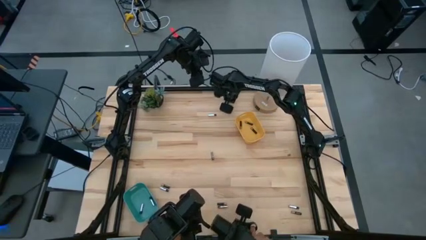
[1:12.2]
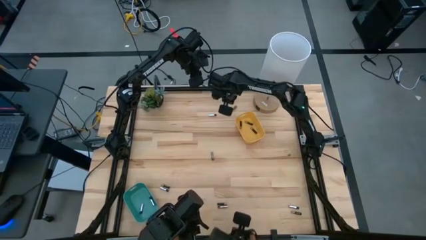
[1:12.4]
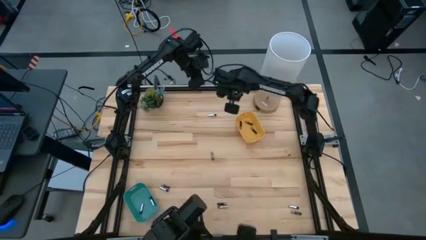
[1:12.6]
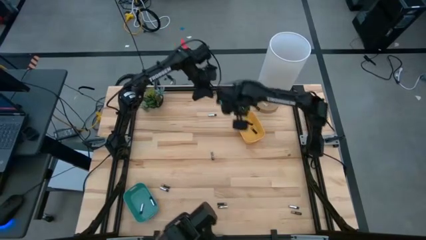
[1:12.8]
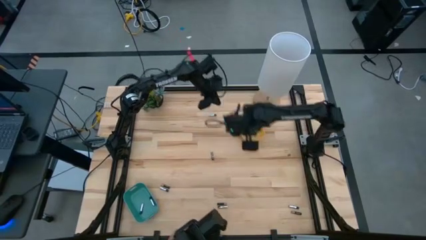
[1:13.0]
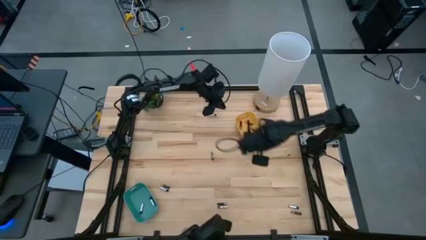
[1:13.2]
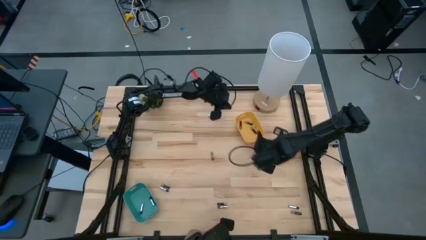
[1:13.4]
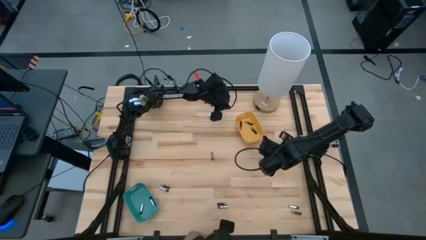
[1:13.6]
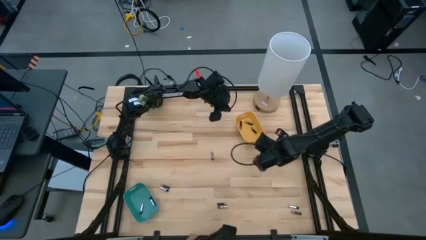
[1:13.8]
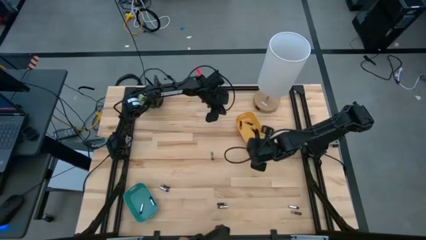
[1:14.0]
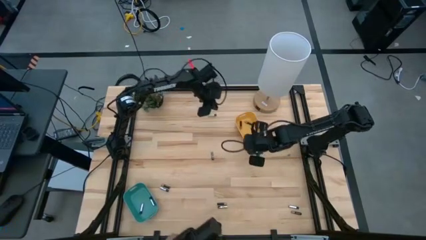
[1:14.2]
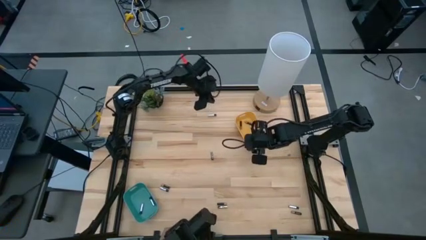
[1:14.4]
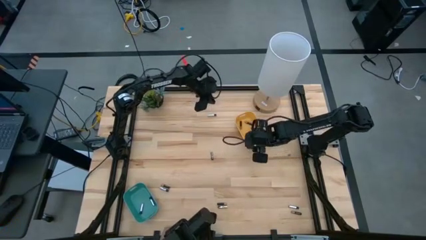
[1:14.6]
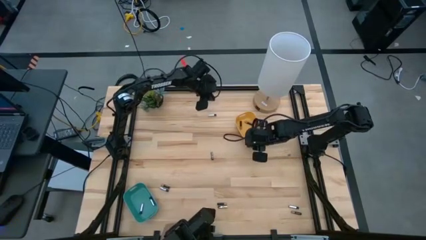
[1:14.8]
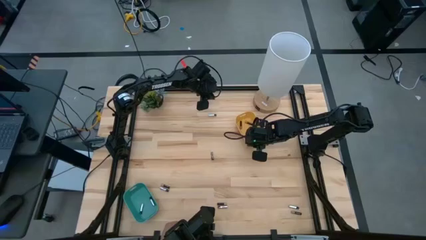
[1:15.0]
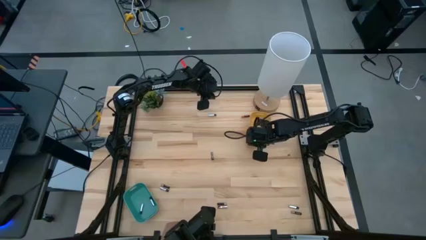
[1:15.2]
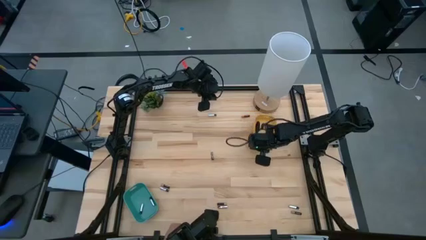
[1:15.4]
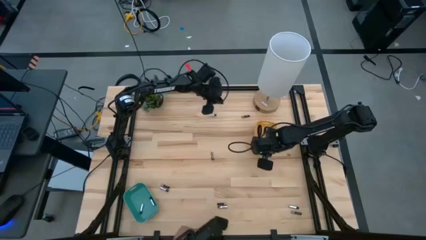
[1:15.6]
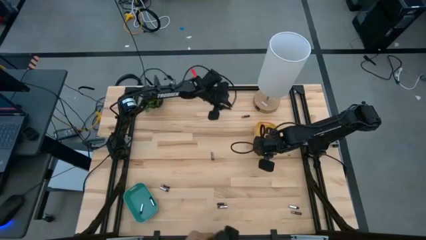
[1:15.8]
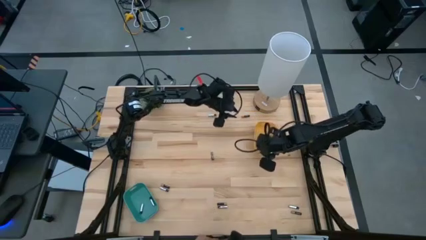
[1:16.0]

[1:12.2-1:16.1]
Task: Sort batteries
Adjust the yellow bin

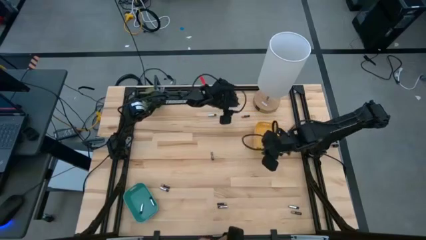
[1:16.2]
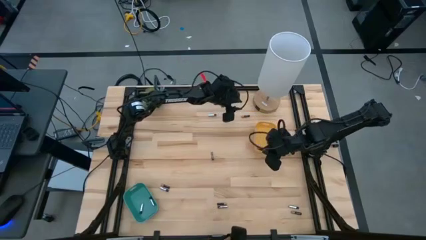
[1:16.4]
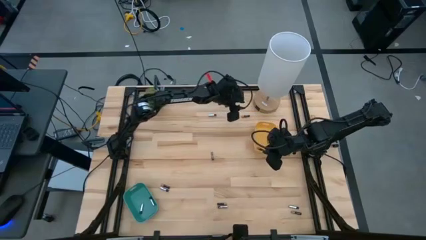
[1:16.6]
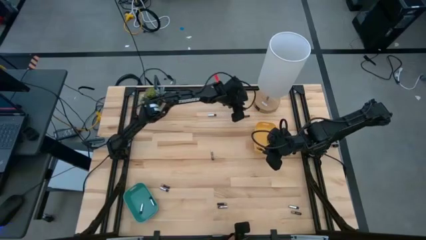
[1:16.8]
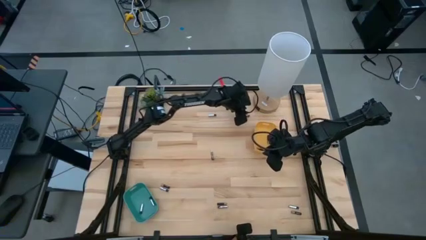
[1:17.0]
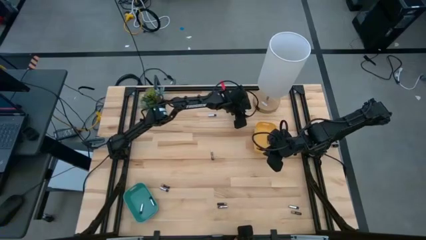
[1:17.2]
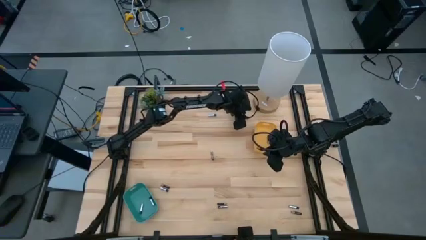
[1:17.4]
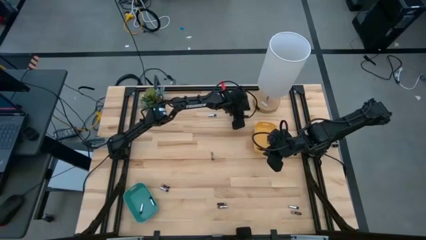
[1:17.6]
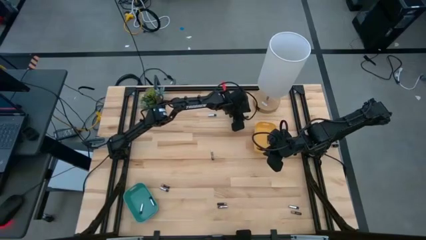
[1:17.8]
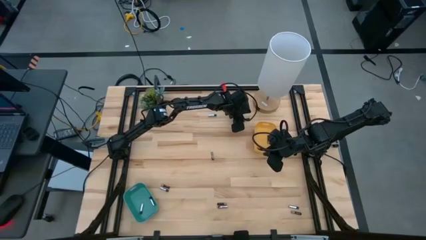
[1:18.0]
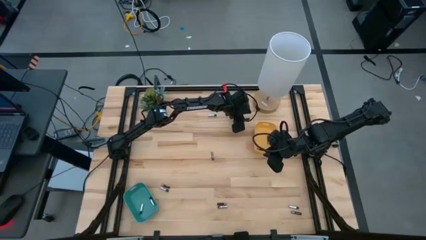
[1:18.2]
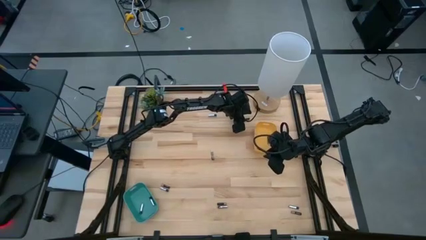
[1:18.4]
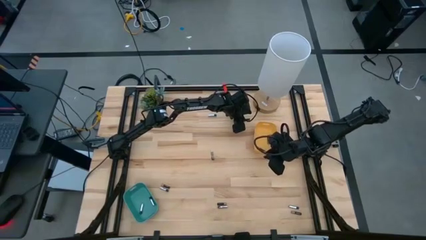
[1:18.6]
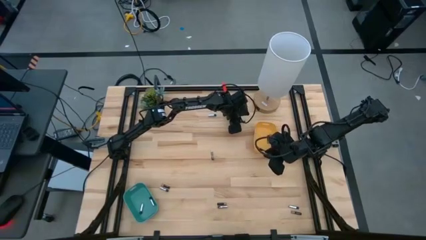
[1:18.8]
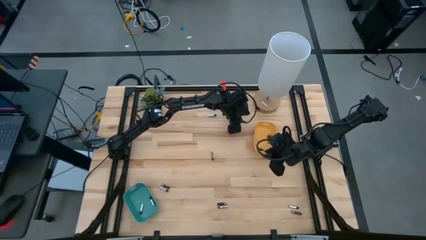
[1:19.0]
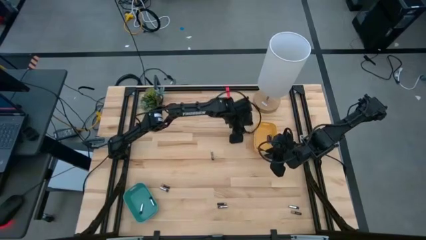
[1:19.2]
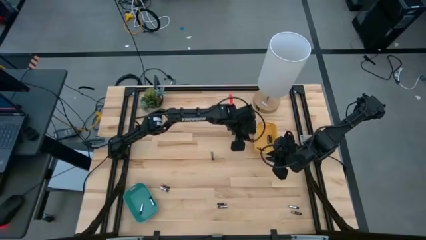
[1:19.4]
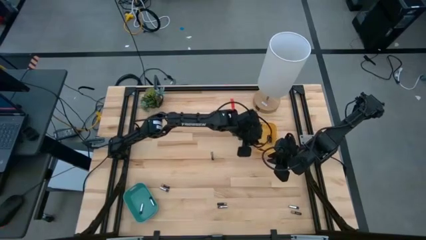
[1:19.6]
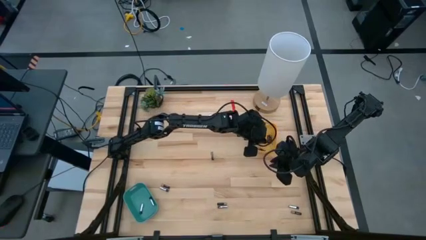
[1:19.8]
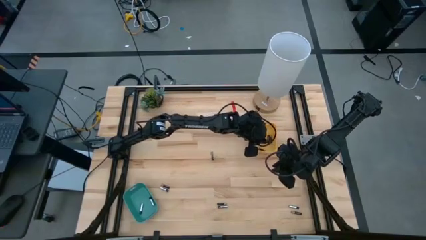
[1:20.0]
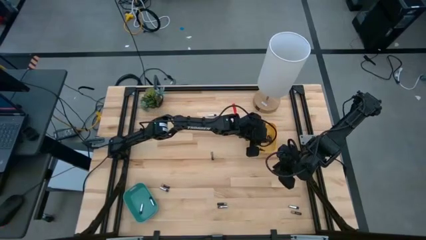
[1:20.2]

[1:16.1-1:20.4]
Put the black battery into the yellow bin

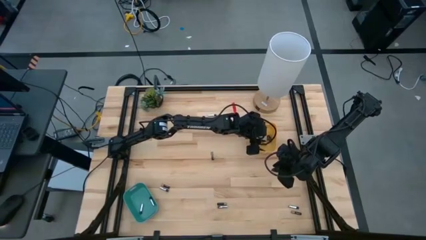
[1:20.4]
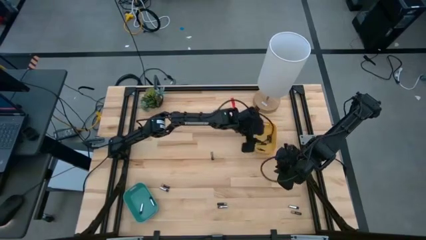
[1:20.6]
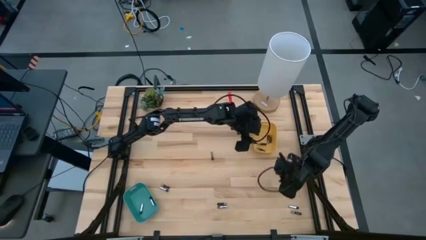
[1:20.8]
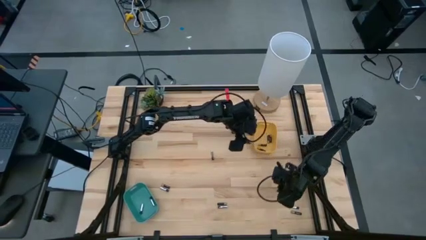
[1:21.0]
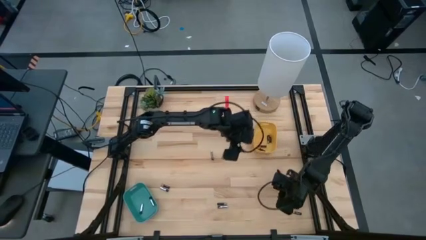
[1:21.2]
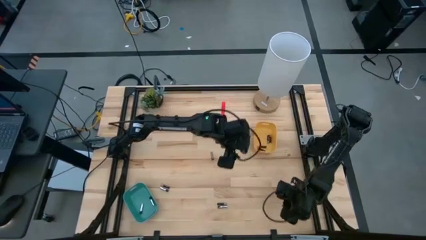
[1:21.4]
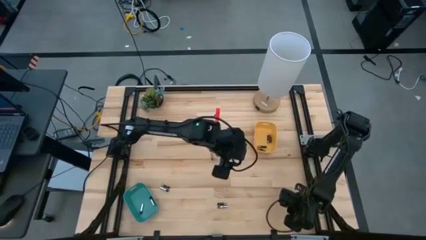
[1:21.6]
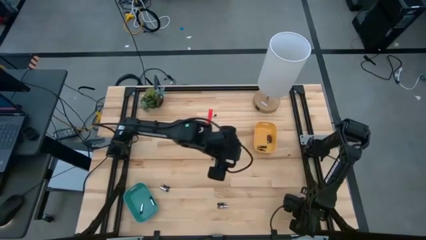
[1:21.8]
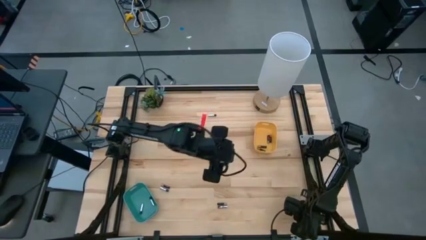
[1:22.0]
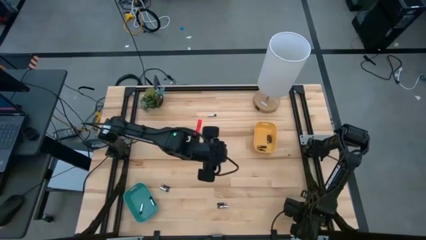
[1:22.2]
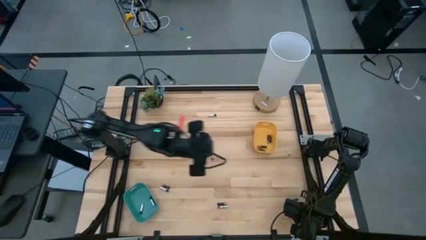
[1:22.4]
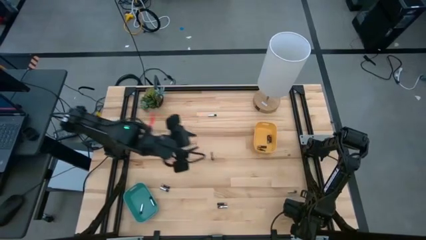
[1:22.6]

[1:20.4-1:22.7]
Put the black battery into the yellow bin

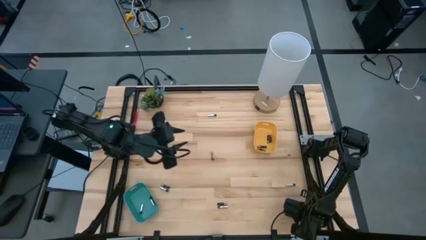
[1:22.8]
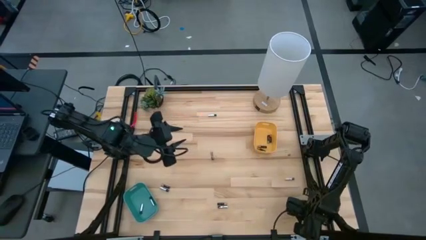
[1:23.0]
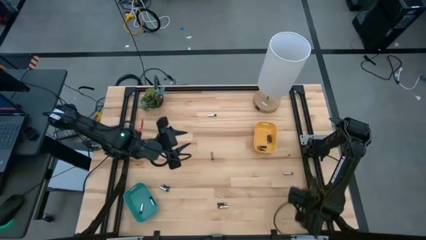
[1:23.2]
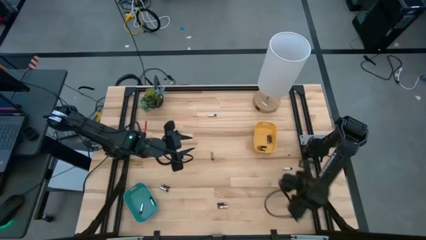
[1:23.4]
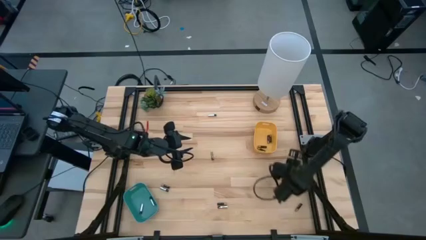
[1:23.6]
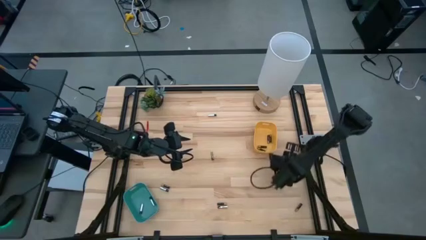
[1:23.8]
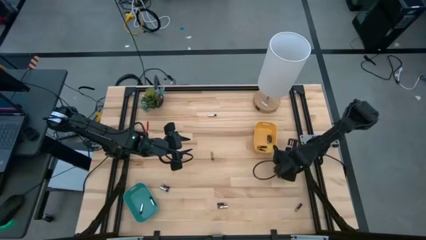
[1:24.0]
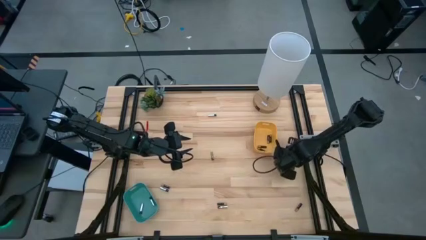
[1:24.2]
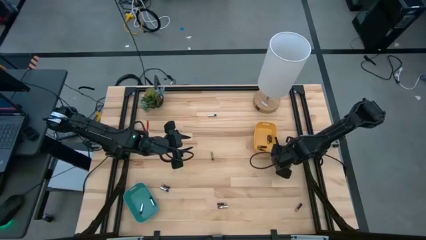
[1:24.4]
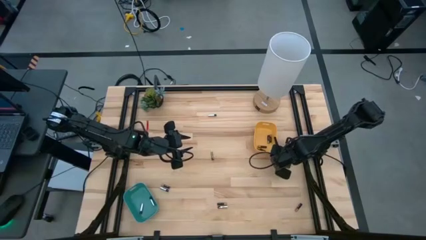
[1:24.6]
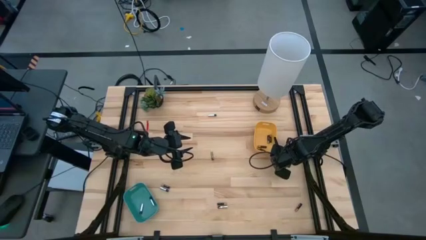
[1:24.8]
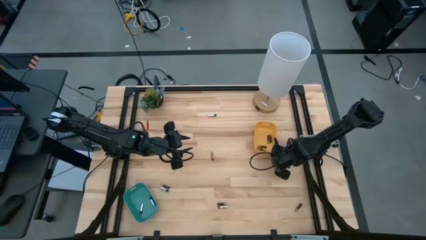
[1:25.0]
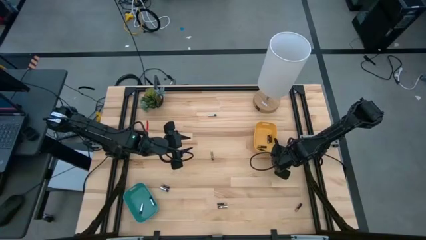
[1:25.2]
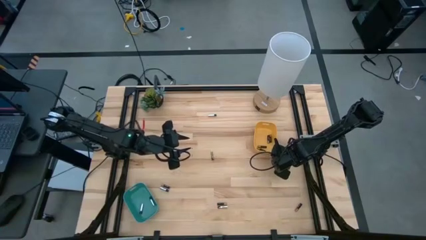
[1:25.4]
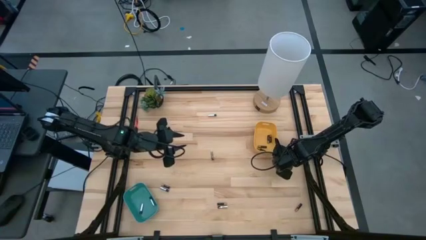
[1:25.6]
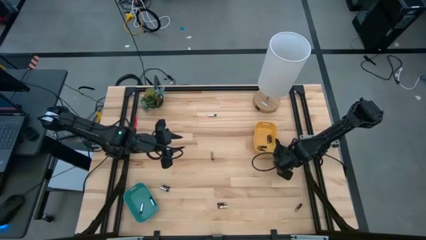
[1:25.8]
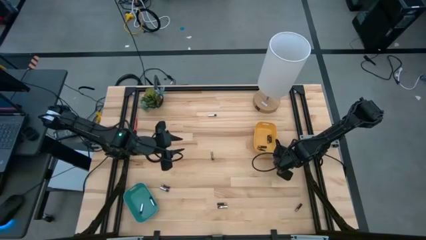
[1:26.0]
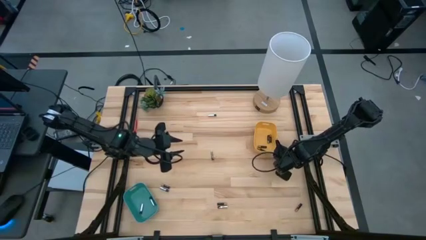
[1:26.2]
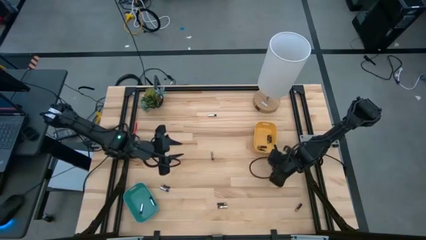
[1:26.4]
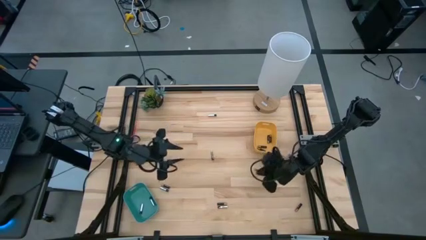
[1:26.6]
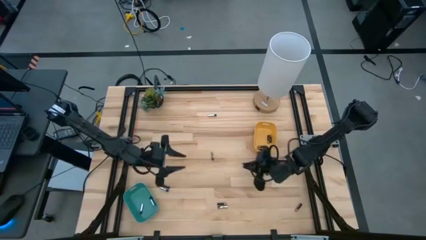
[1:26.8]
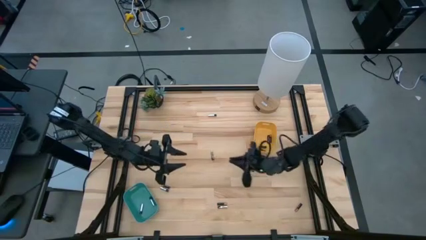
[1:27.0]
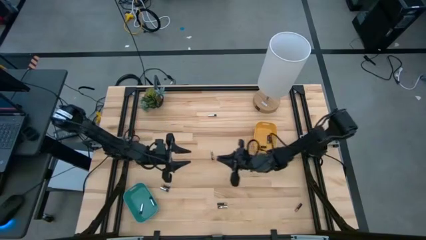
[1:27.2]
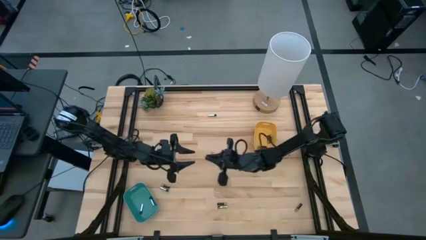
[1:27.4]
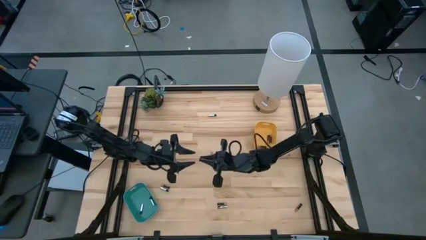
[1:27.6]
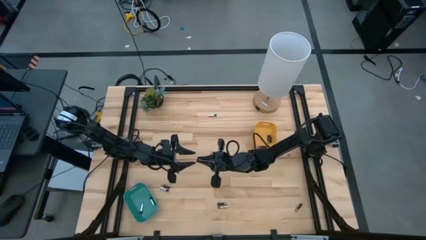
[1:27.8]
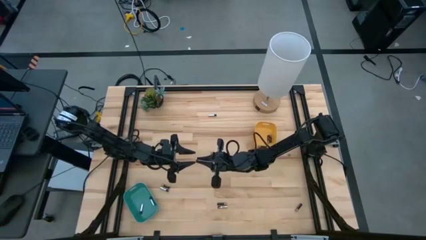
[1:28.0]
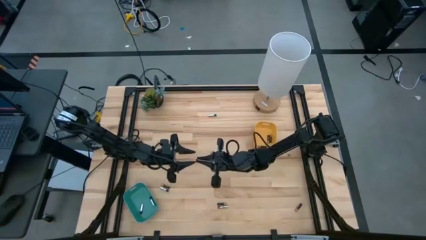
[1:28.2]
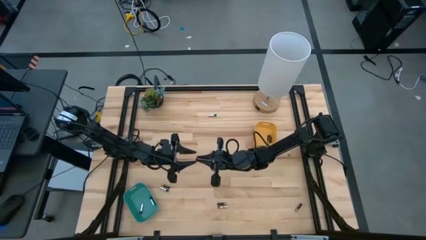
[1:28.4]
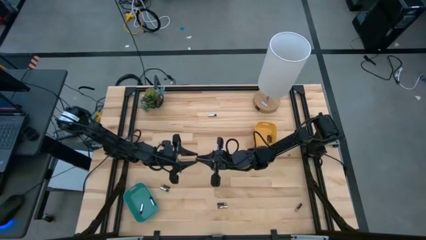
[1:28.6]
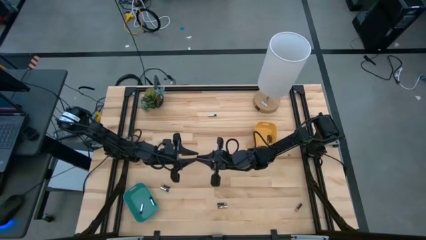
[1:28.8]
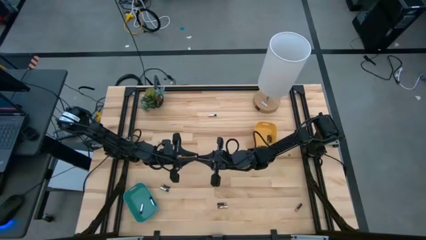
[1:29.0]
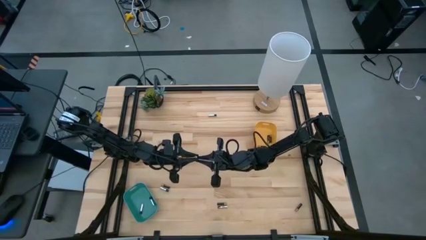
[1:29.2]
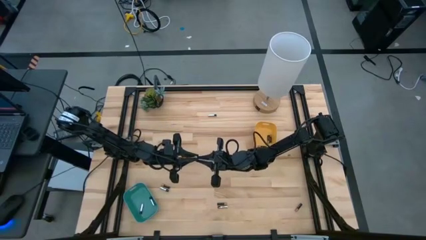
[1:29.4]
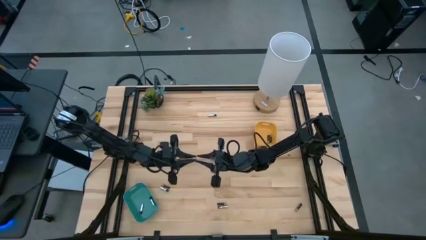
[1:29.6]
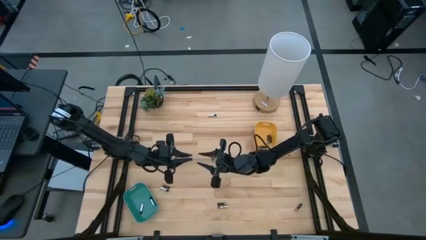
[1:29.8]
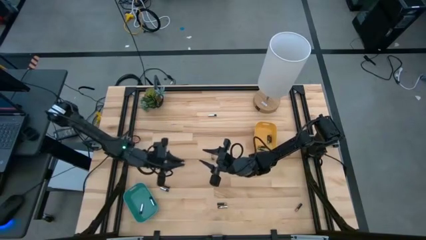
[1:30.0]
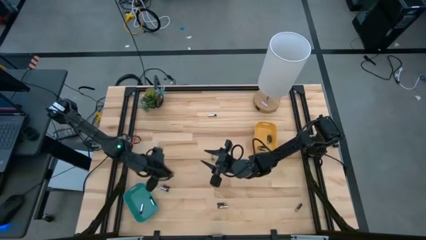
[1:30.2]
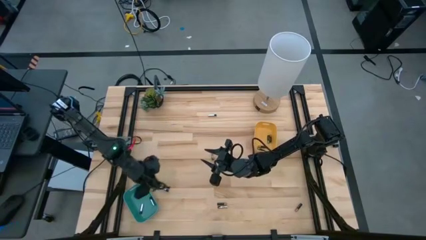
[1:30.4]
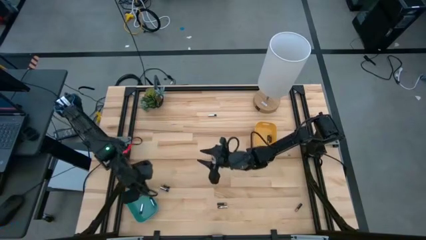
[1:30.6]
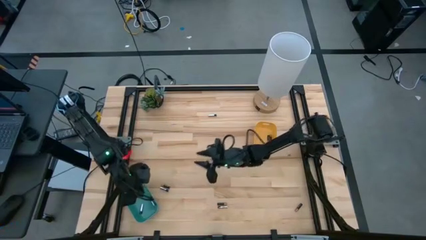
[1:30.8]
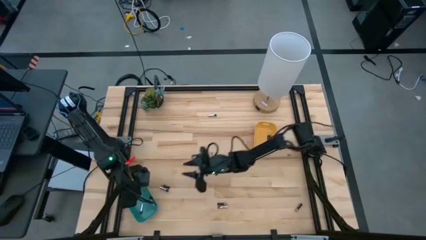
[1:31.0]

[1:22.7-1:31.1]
Put the silver battery into the blue bin
